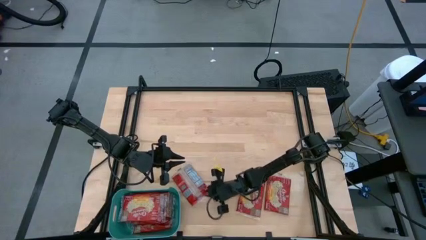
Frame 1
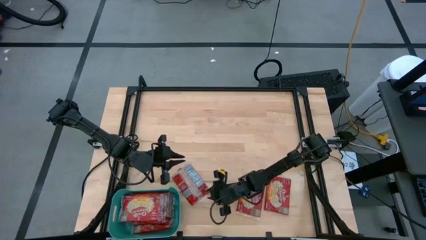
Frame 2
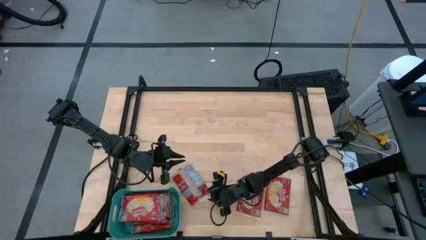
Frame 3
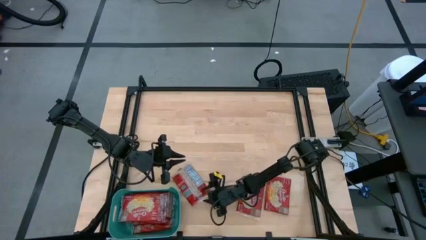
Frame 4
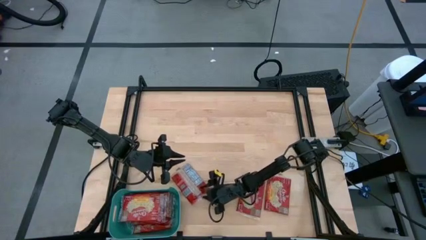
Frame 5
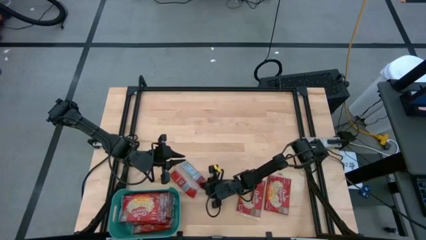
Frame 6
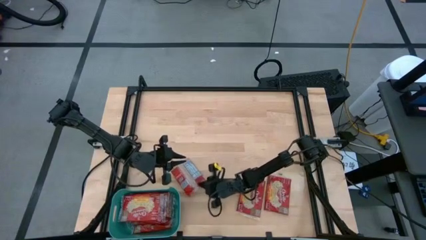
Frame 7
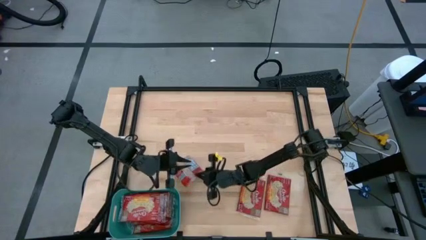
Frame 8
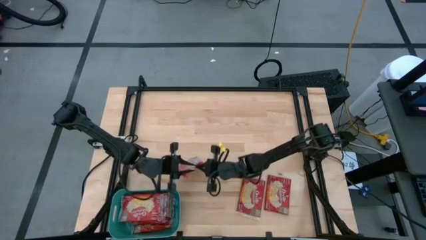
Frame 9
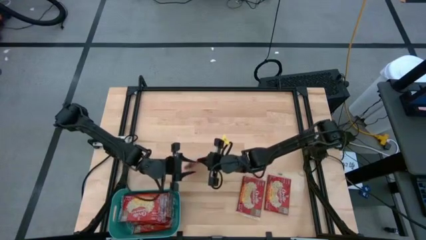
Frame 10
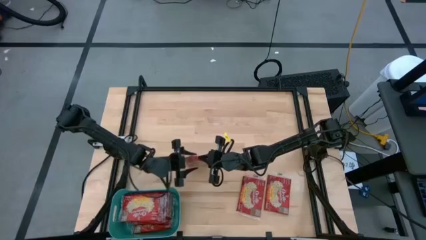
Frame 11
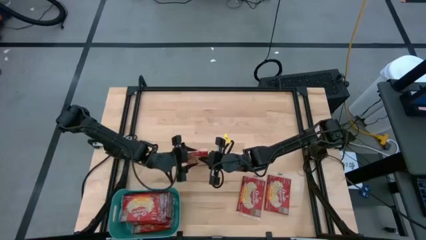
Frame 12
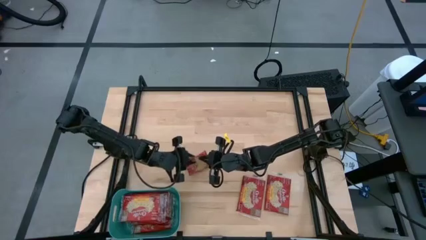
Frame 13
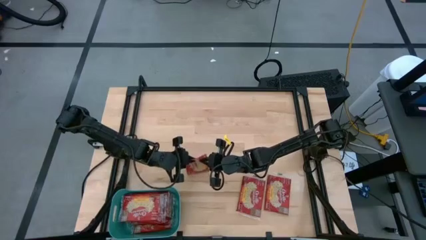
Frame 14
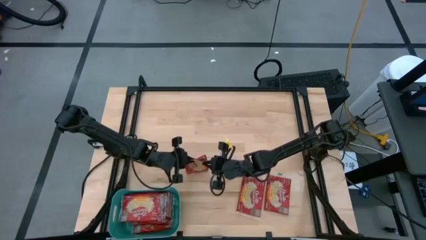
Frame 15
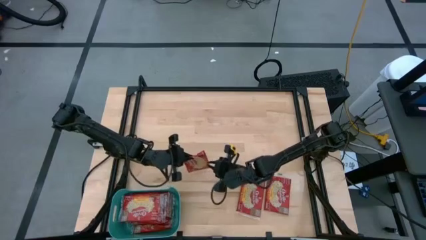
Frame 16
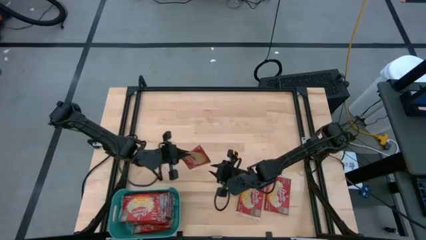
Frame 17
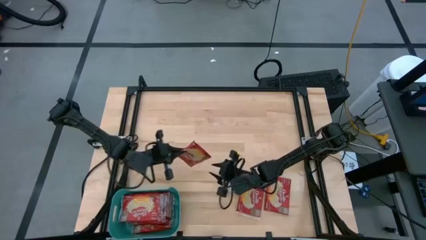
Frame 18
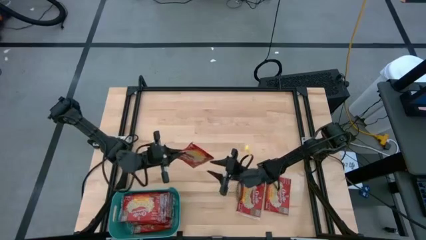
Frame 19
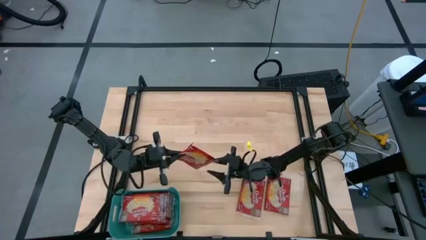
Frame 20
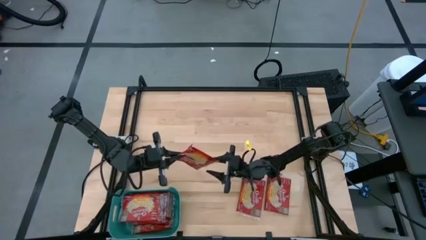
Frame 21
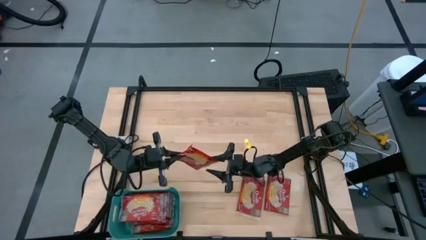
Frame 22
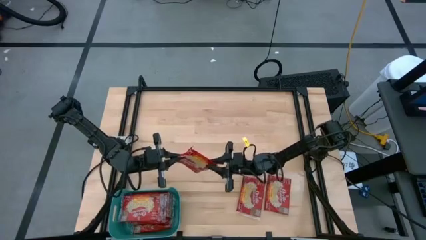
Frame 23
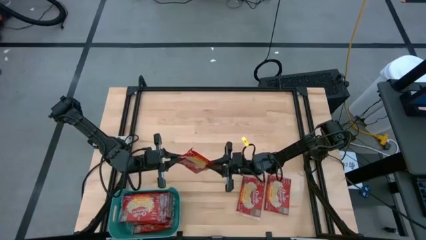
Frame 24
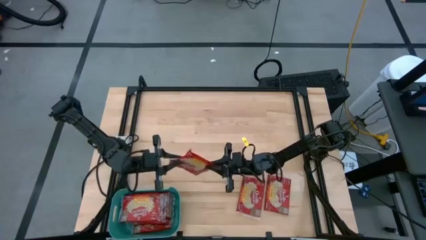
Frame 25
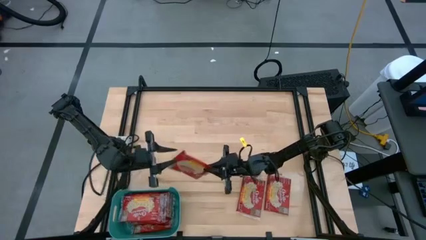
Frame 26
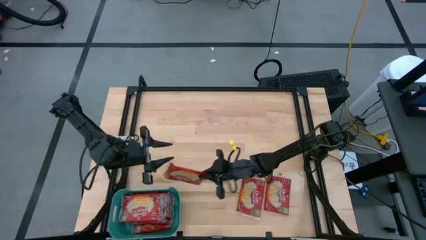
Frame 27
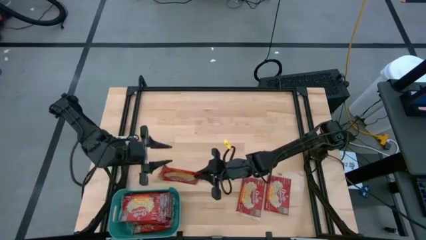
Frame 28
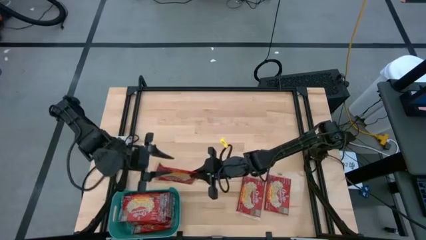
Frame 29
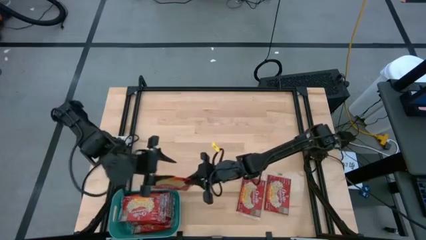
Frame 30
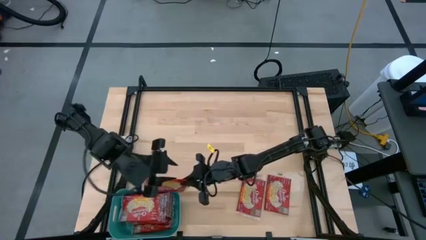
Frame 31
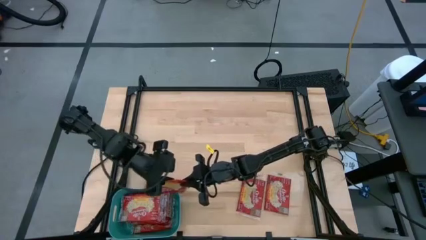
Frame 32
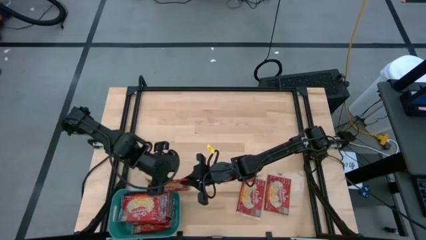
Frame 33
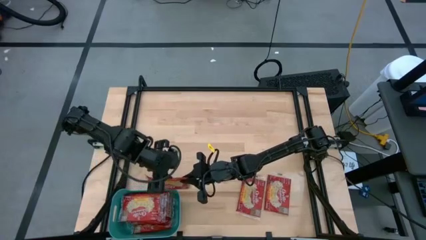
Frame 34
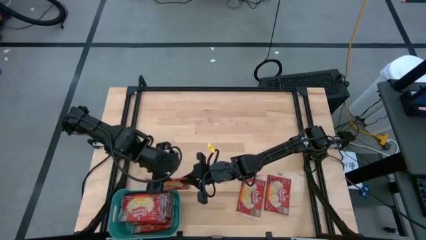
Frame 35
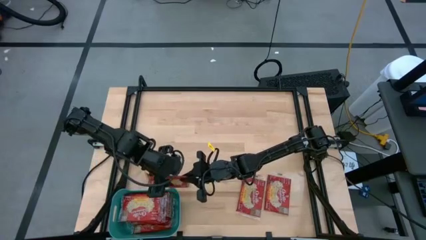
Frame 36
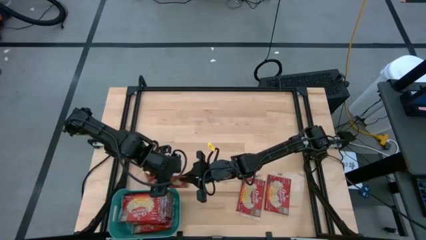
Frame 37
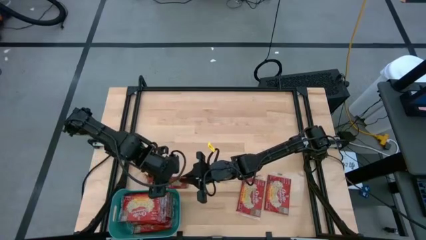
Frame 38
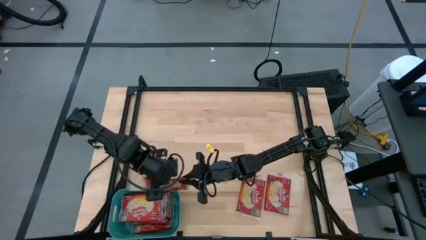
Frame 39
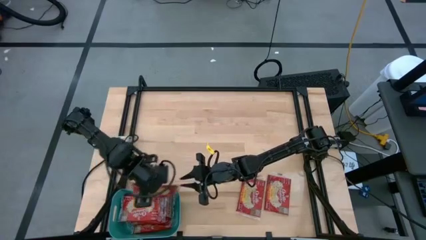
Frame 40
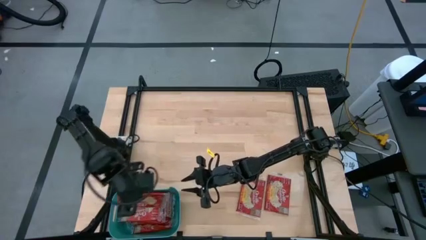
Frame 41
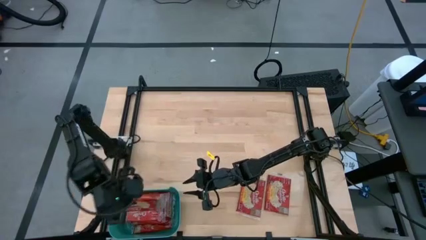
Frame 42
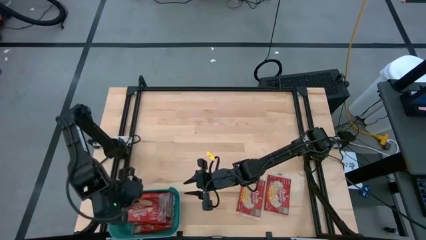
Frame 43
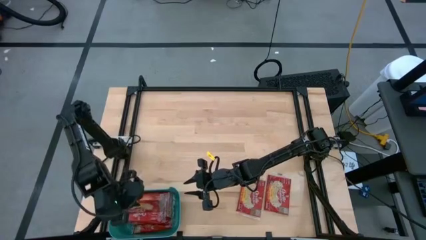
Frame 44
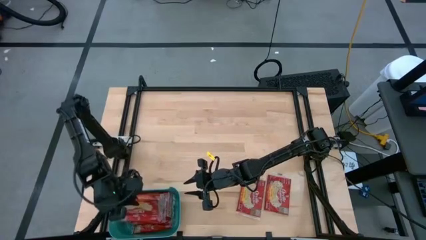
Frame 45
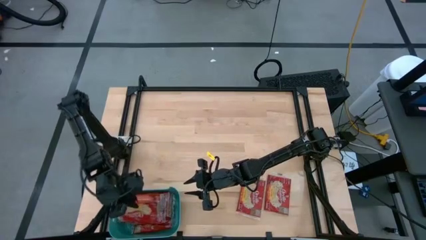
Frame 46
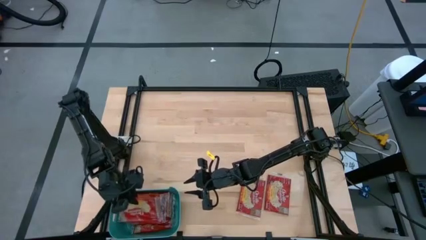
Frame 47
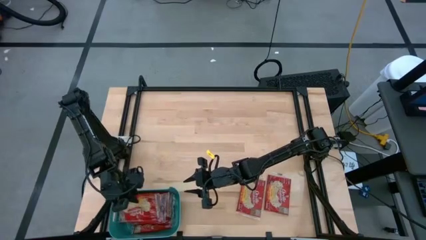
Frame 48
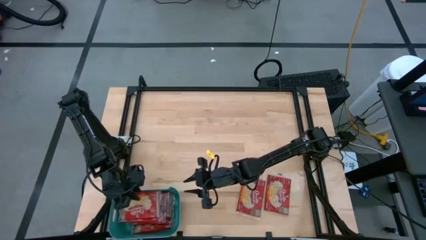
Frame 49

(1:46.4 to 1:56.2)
Task: Sort popcorn bags into baskets
Put the red popcorn bag into the blue container

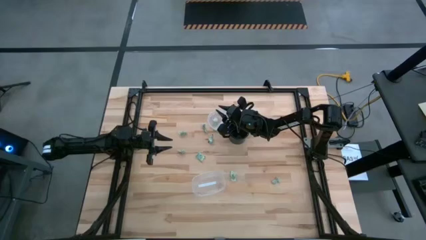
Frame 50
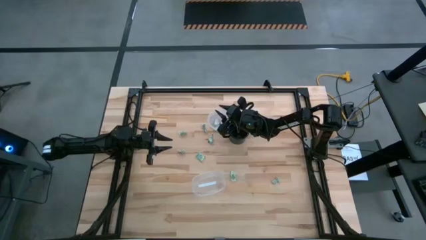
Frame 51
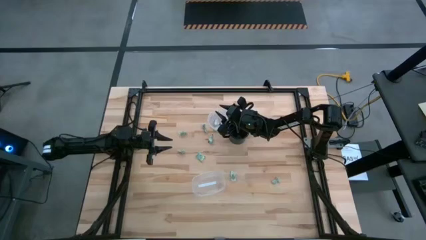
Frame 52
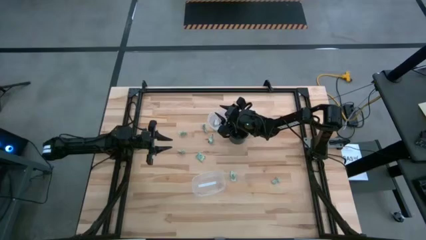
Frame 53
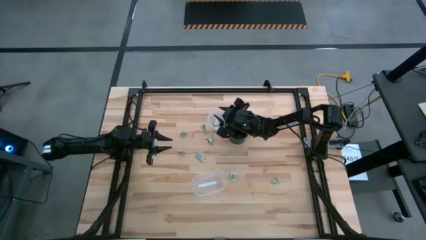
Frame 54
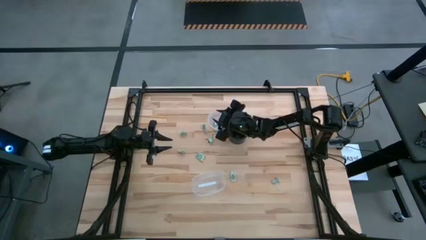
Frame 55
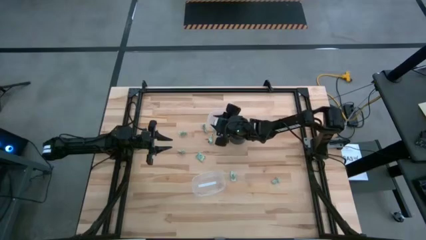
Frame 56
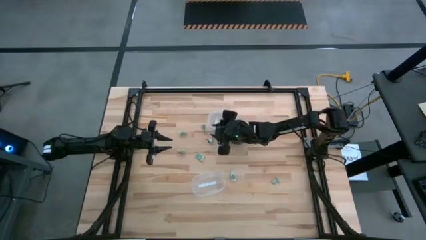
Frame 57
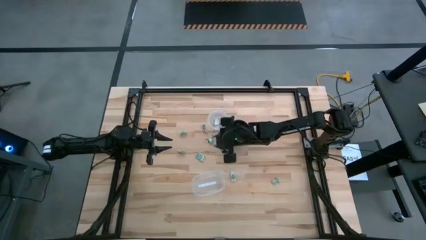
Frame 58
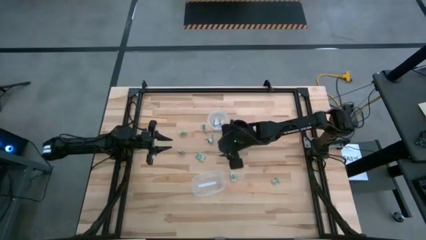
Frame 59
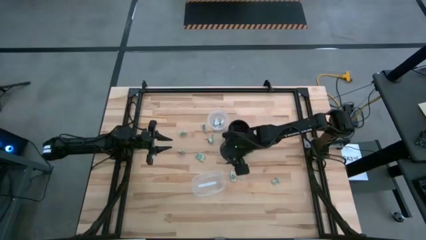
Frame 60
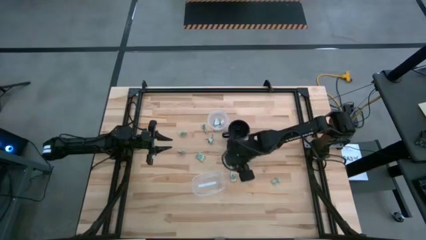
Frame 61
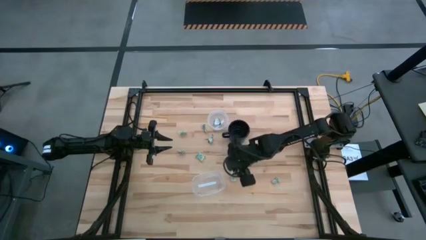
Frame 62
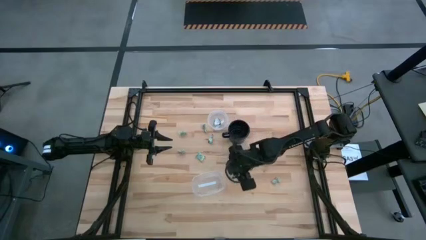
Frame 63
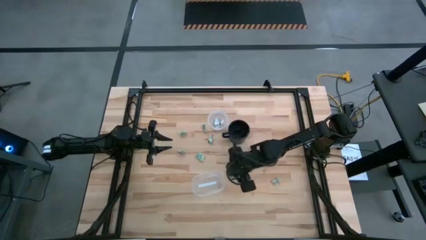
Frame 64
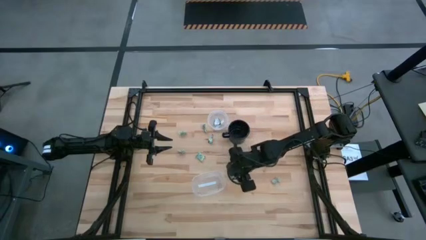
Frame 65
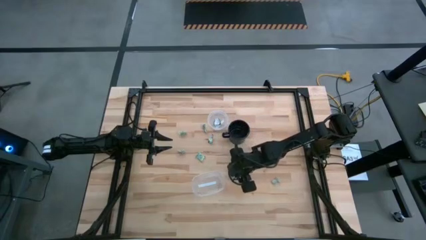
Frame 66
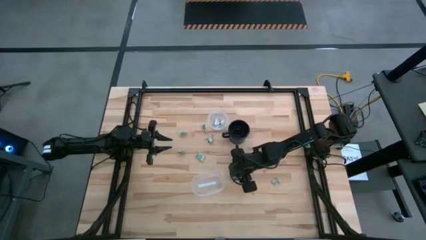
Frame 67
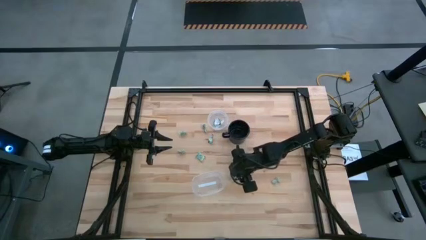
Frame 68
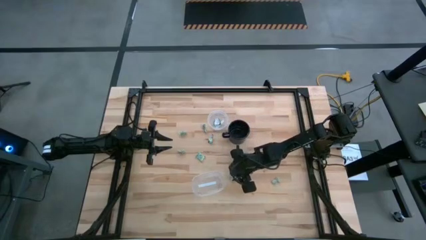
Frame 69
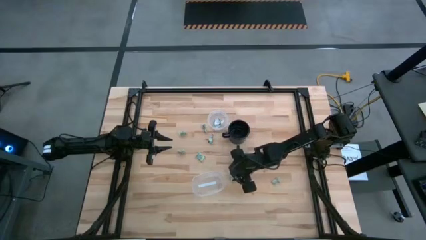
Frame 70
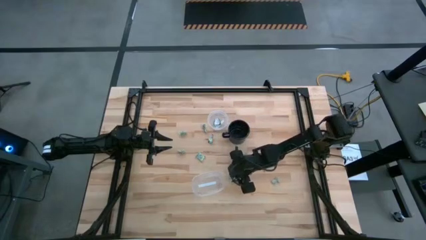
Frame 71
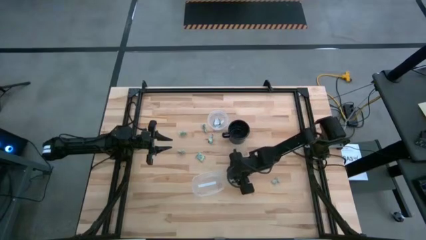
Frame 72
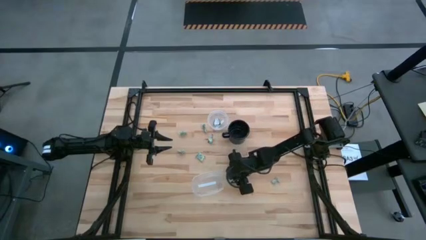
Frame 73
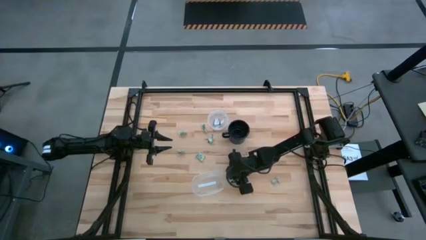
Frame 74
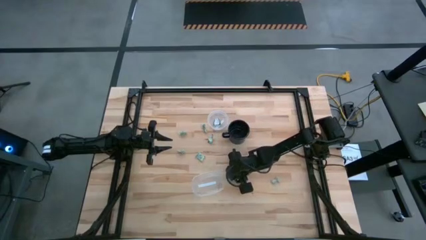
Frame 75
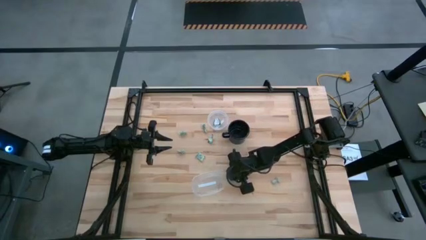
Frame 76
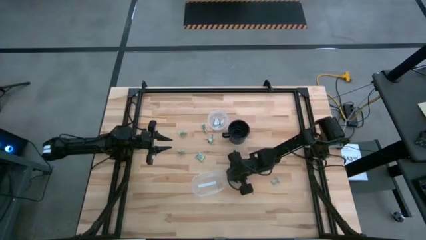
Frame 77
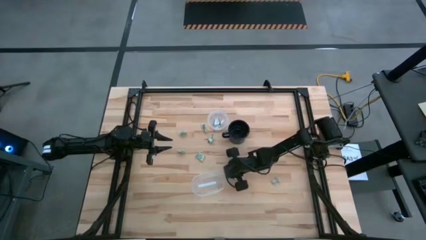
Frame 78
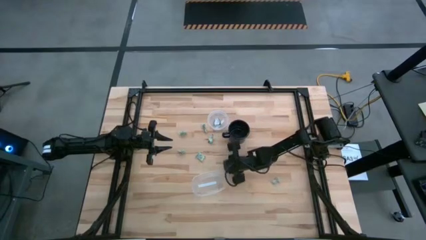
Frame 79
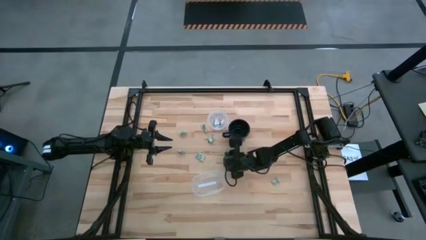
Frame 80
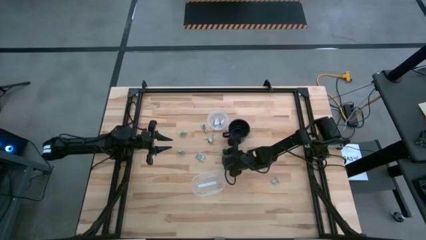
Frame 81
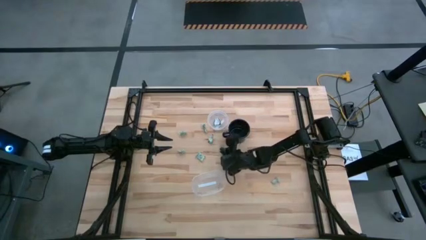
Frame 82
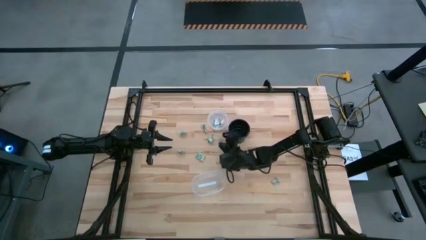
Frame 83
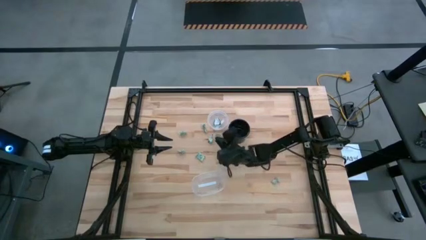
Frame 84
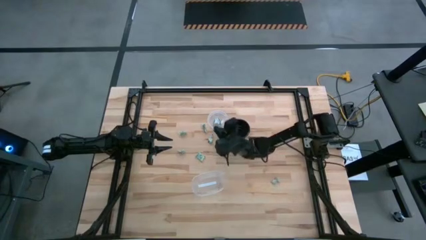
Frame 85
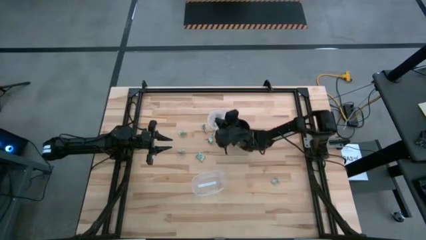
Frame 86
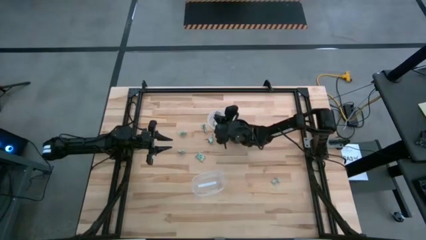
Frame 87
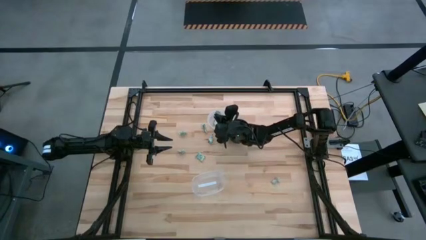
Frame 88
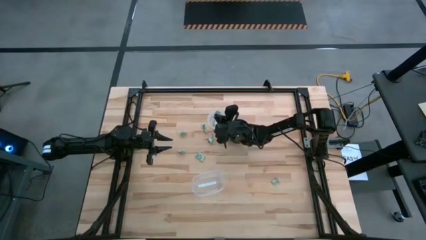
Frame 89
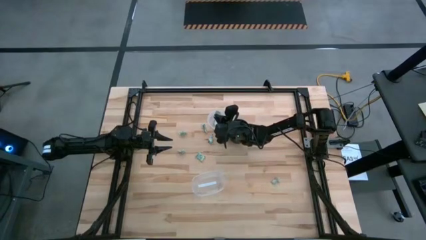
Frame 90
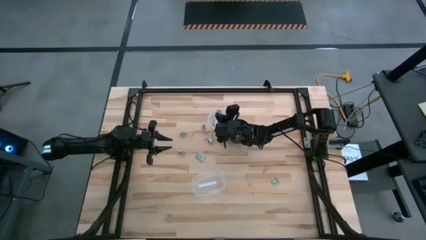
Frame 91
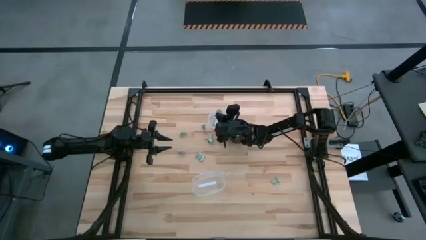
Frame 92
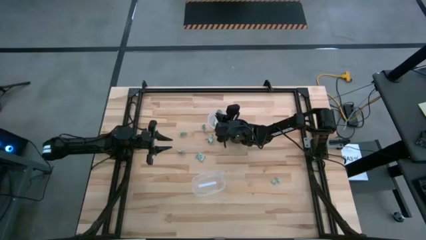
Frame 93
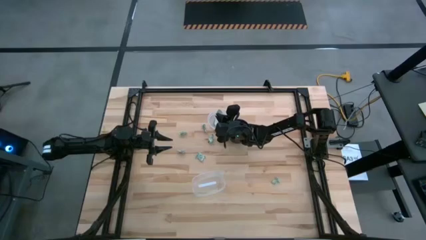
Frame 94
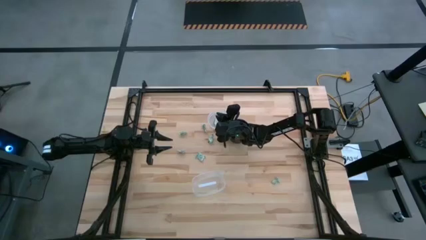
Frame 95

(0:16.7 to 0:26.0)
Task: Pick and place Stevia / Truvia into bins
Put the stevia packet into the top transparent container
